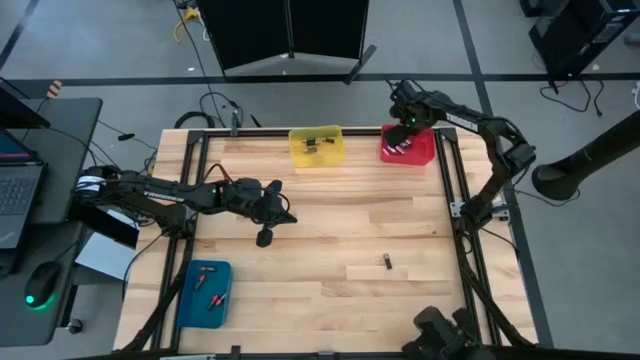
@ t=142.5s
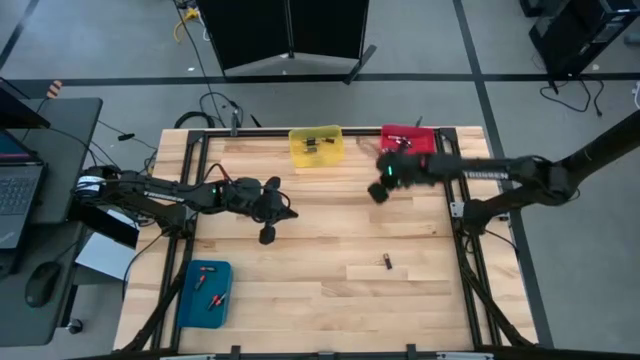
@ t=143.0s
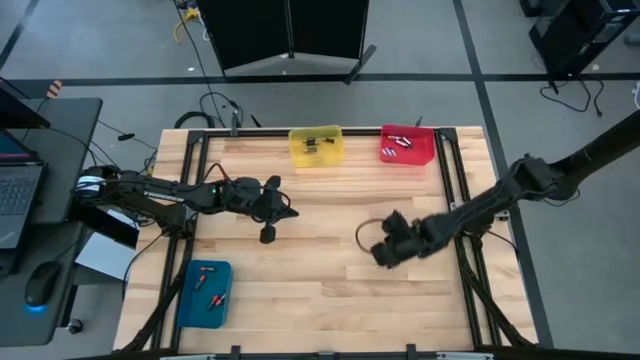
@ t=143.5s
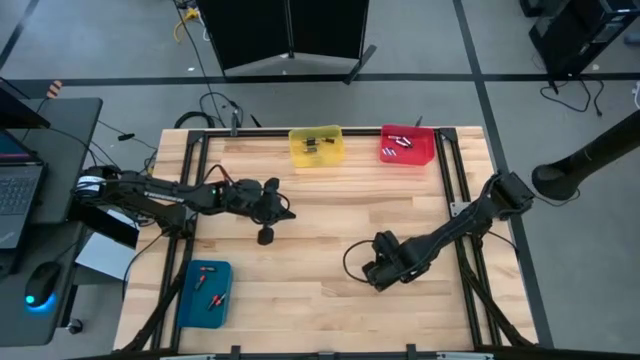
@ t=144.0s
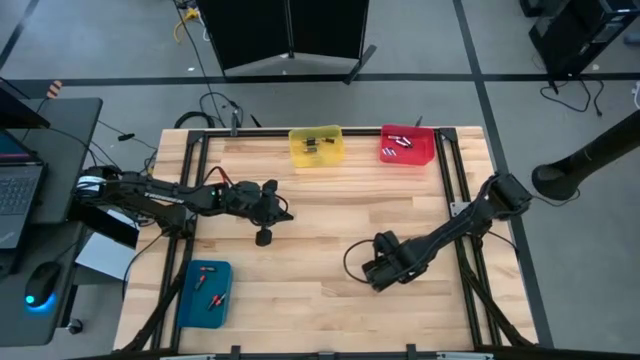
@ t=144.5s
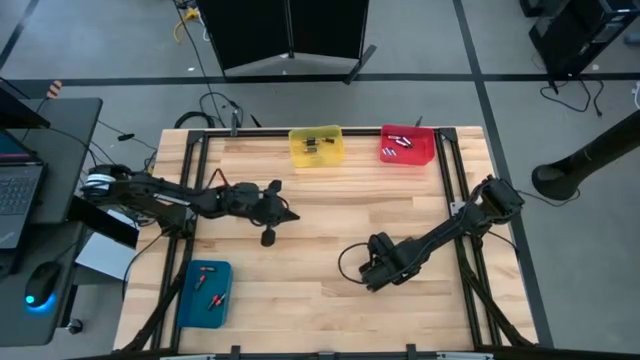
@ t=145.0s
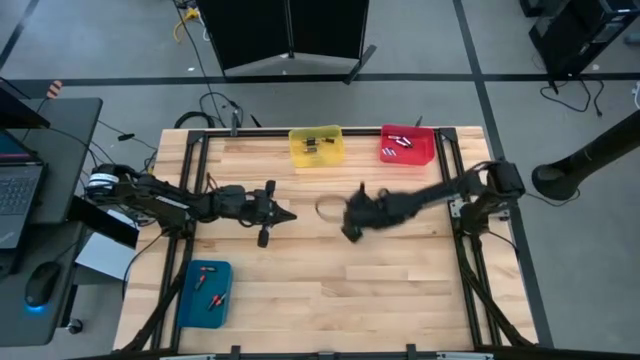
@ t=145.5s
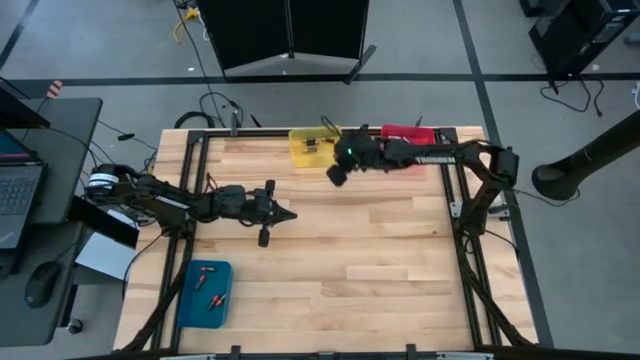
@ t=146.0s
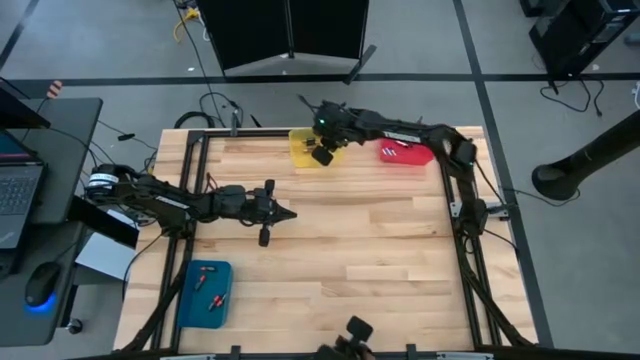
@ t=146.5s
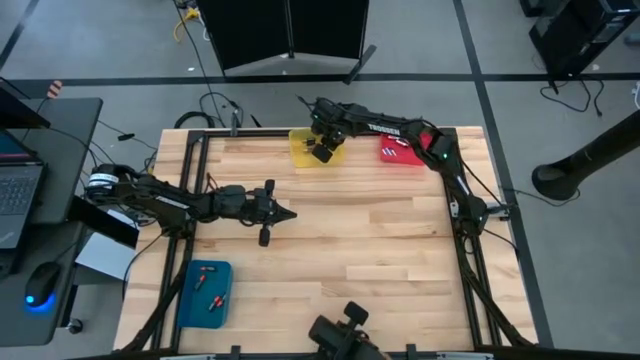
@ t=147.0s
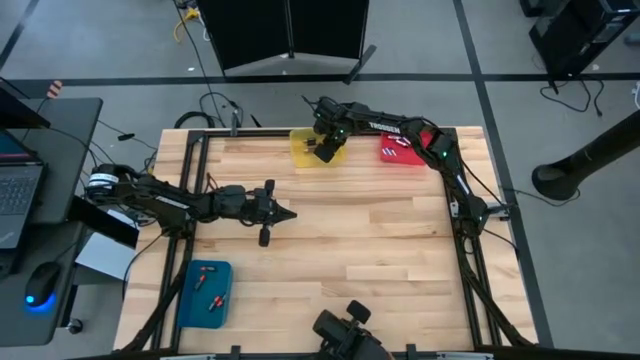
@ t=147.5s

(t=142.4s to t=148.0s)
Task: Sort batteries
Put the black-brown battery into the yellow bin

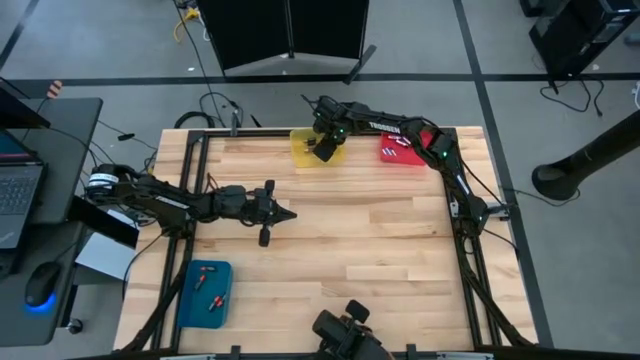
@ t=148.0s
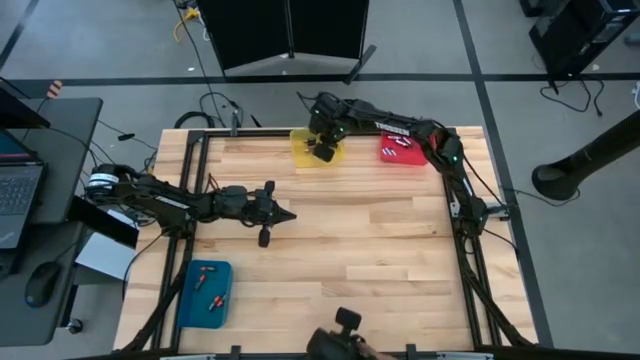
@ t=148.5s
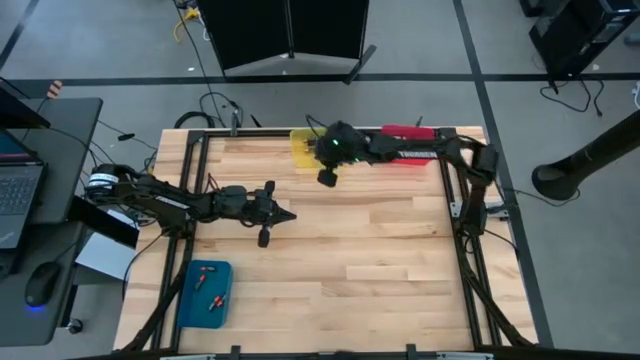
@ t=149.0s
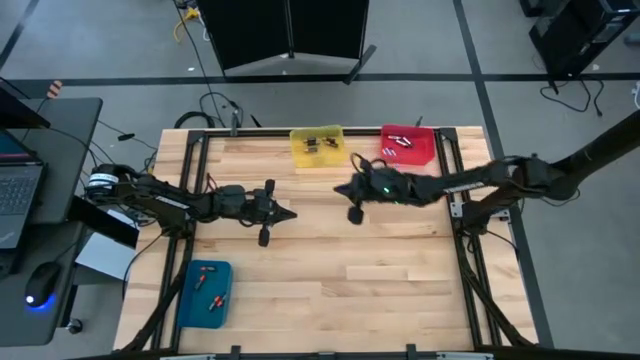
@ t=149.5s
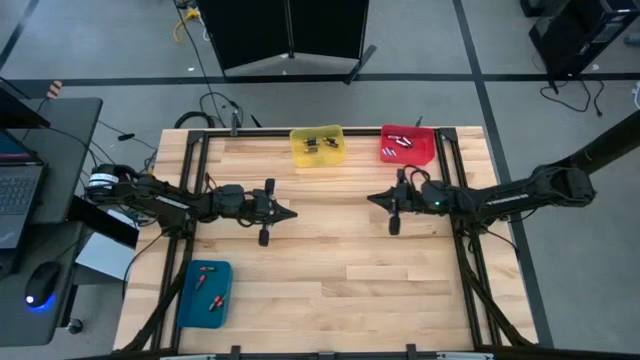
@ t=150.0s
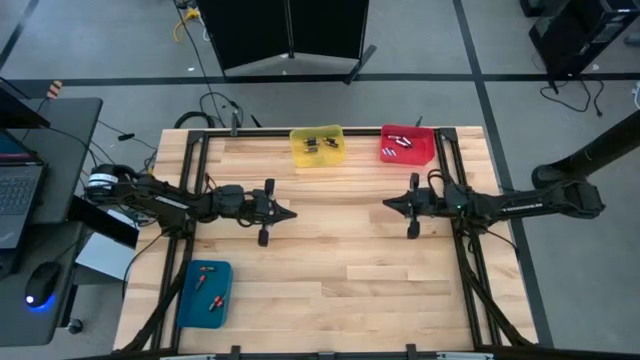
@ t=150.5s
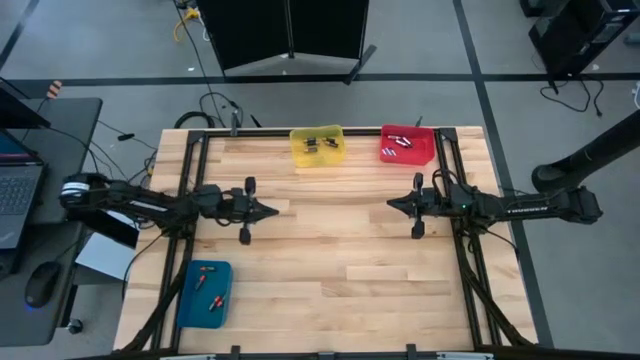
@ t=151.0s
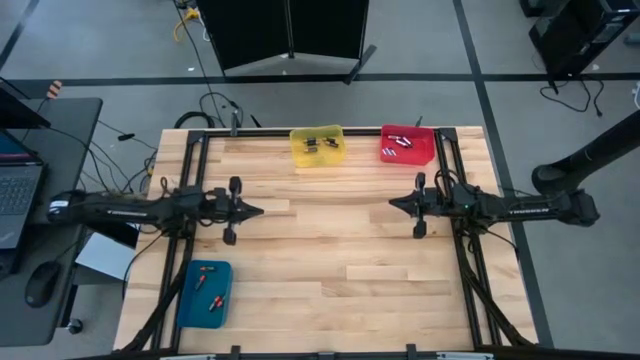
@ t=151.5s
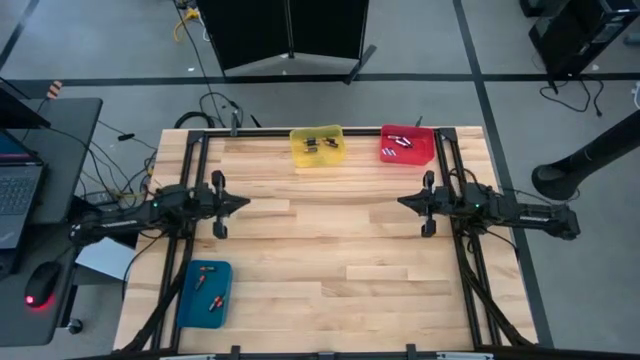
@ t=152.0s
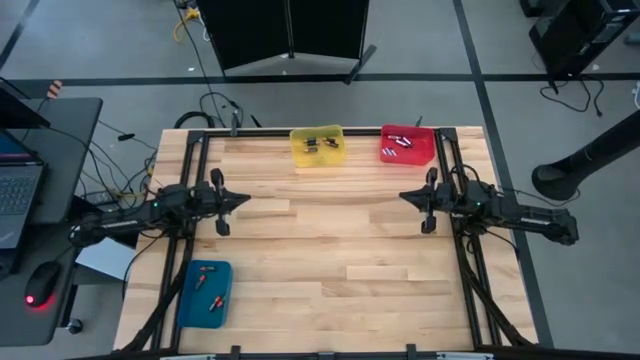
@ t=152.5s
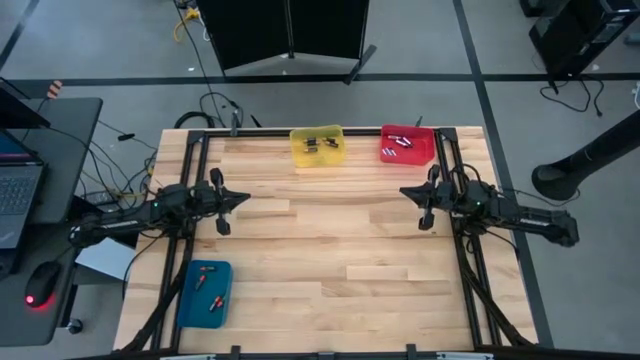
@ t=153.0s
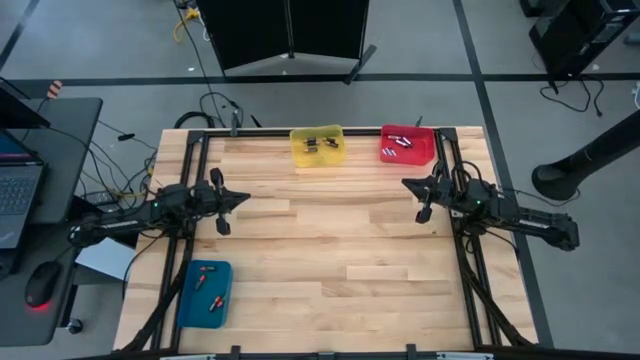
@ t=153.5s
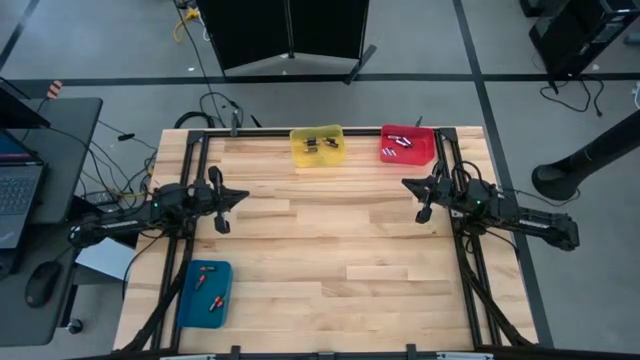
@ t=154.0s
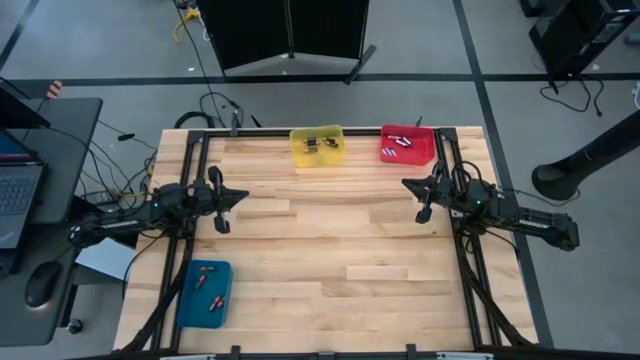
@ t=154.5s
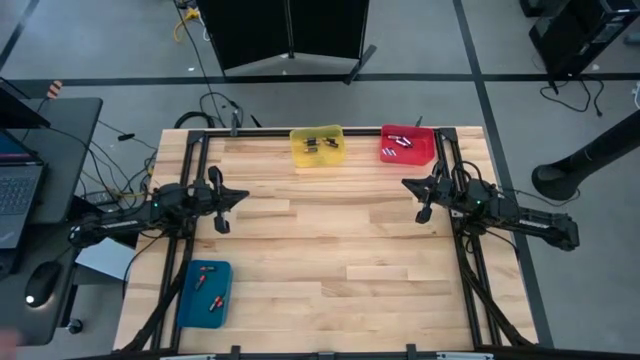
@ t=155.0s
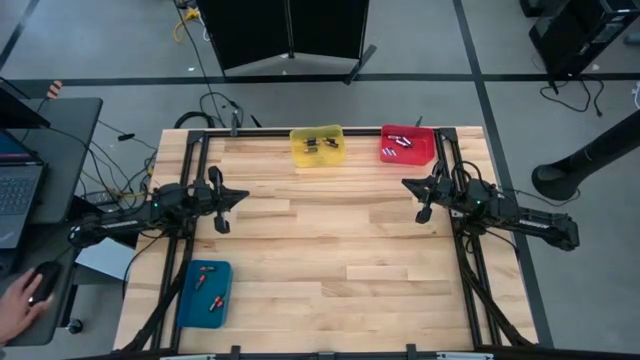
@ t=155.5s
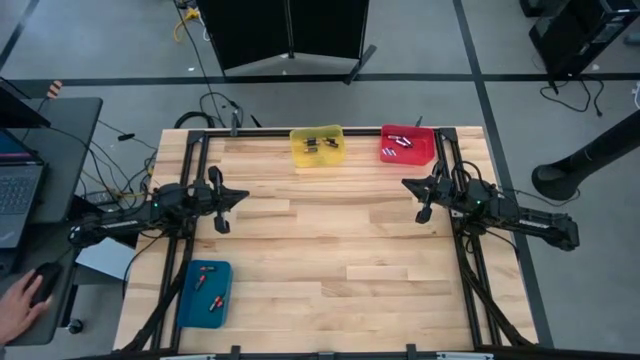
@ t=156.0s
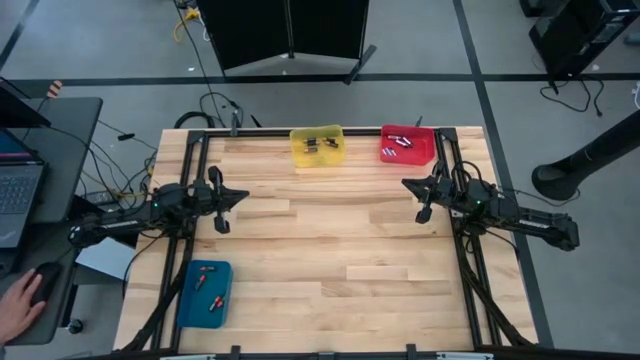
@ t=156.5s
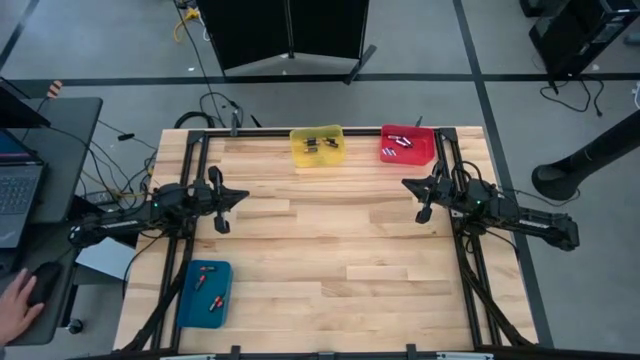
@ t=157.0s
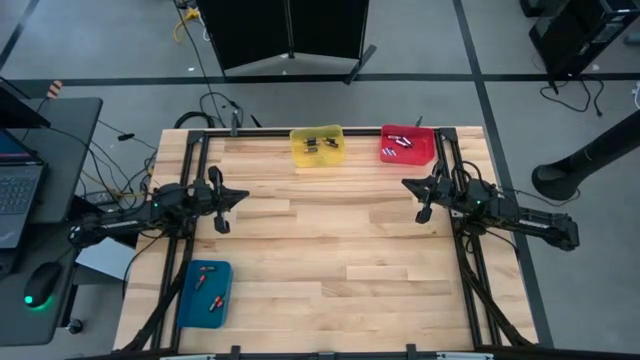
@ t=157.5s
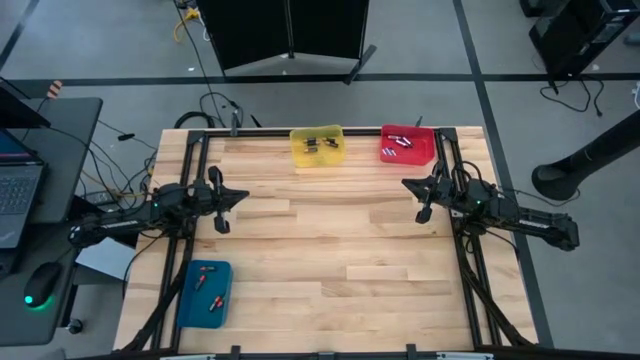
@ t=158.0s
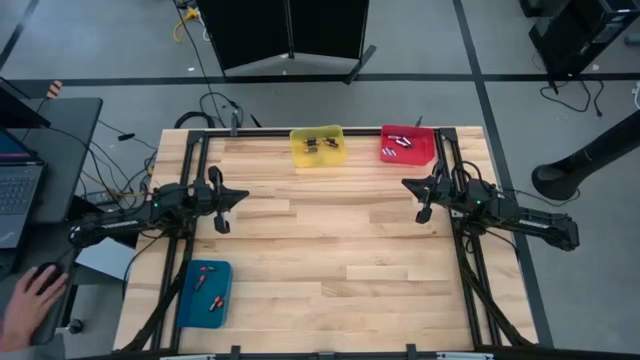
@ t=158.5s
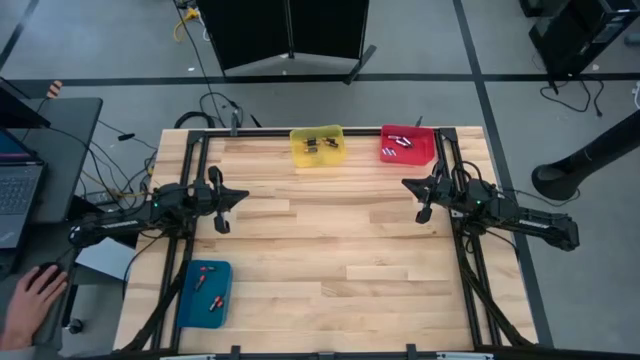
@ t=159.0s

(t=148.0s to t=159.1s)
Return to Home Position

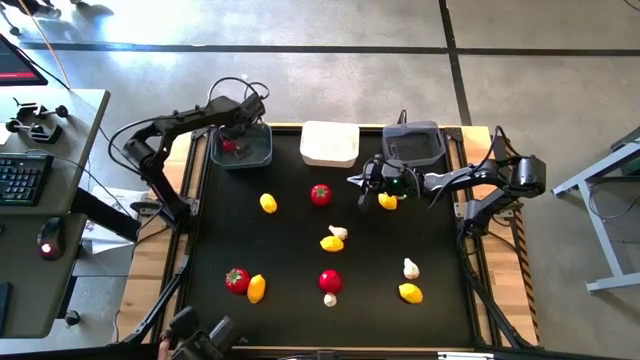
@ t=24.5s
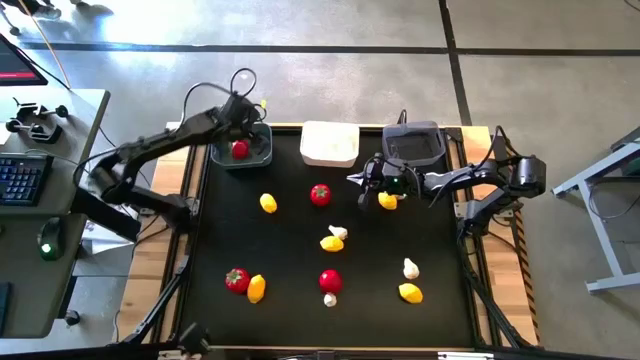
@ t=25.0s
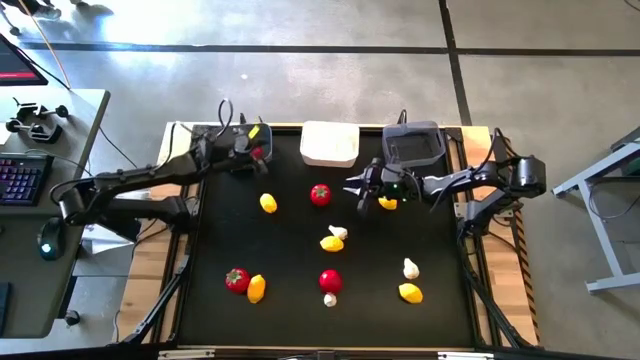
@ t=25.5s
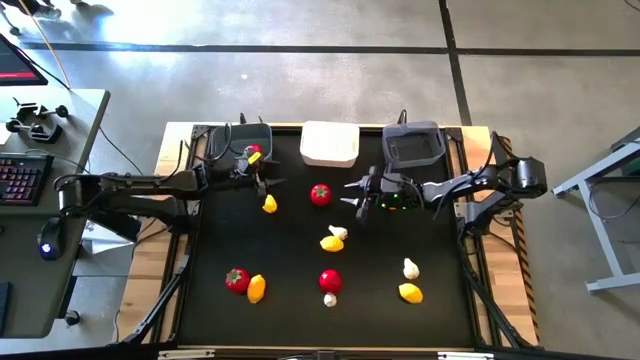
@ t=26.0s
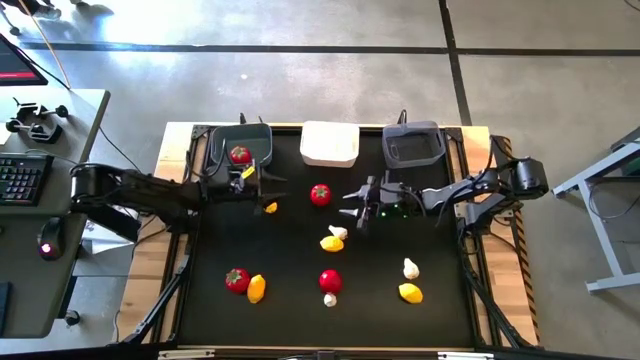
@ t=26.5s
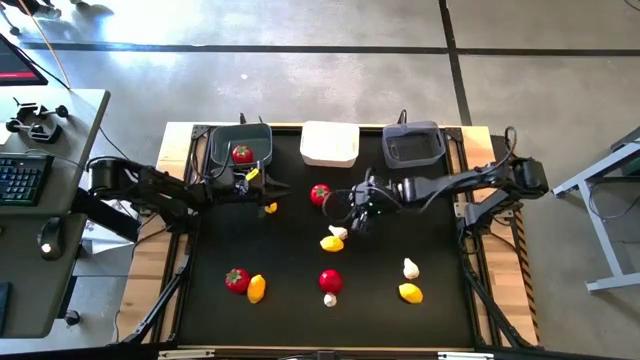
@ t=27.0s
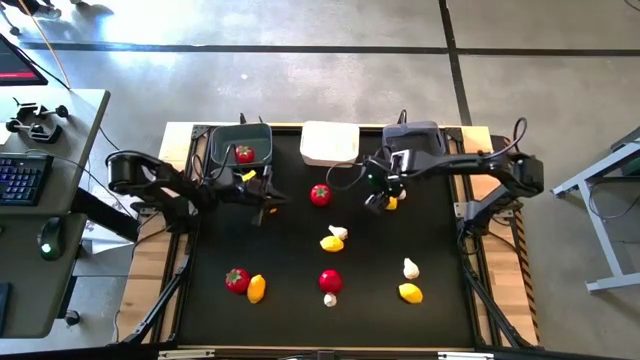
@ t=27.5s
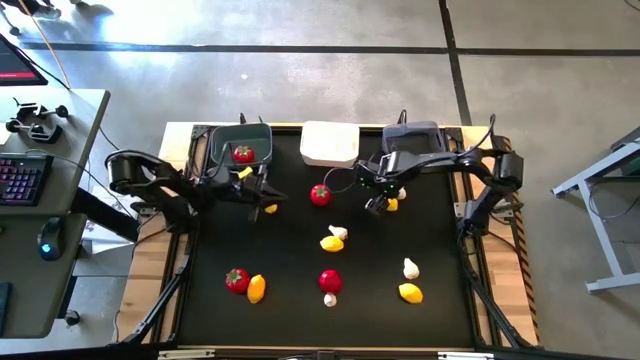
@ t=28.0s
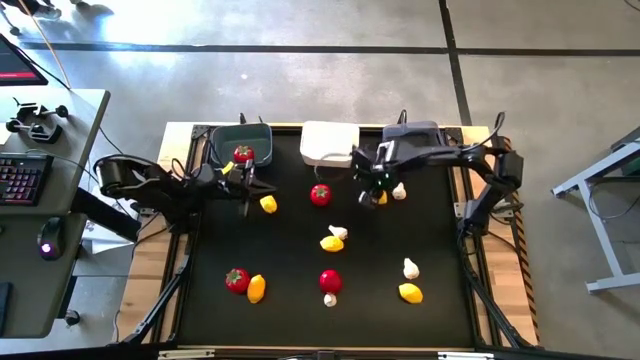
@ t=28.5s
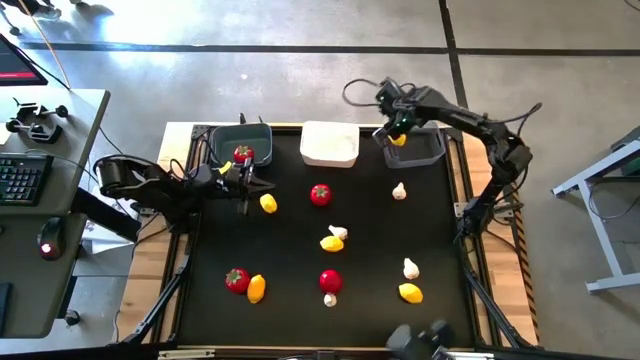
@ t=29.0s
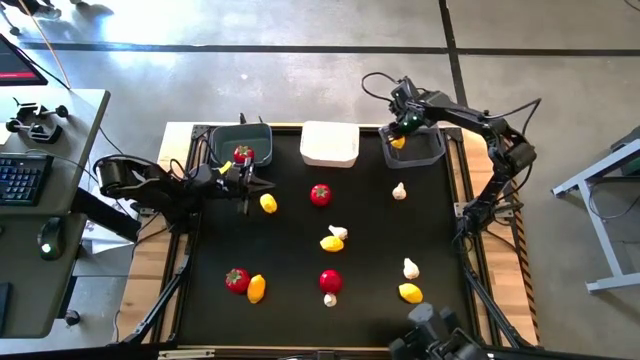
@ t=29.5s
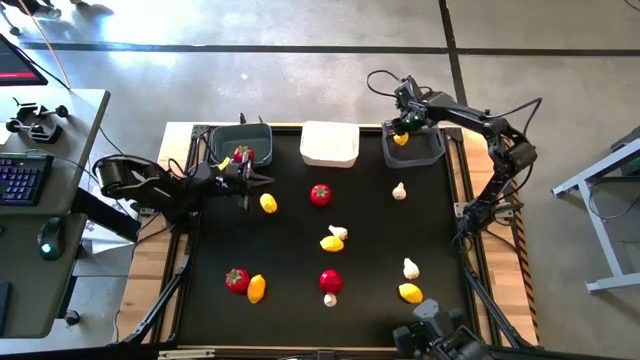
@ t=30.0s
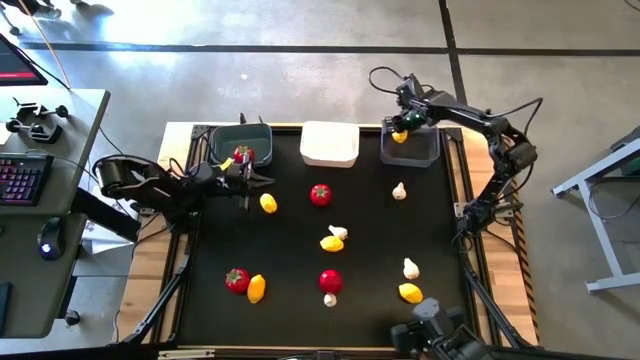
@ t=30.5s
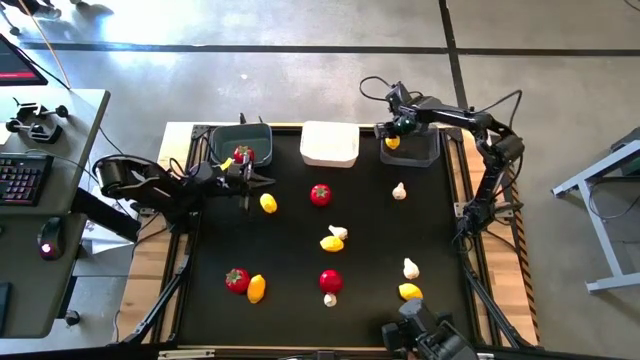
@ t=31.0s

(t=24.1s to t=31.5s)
Task: Sort produce into baskets
Put the top right yellow lemon into the transparent bin
